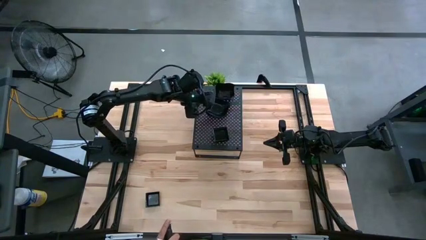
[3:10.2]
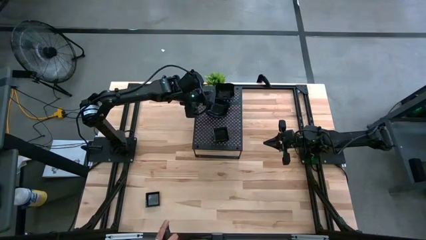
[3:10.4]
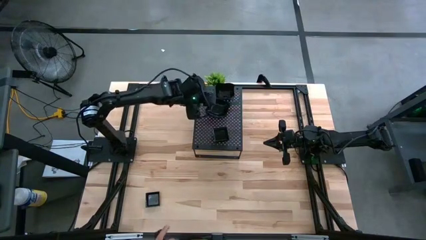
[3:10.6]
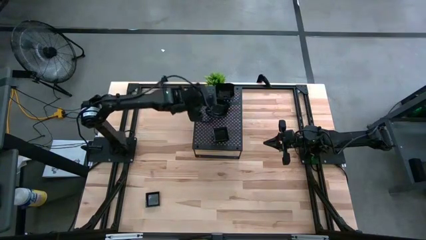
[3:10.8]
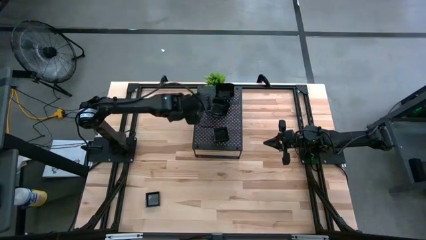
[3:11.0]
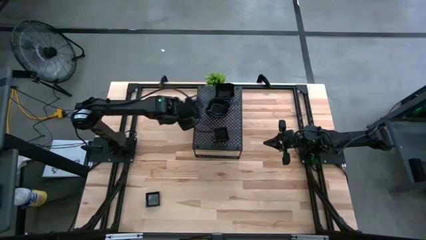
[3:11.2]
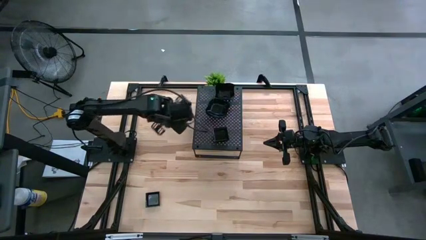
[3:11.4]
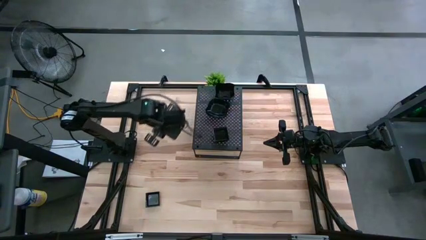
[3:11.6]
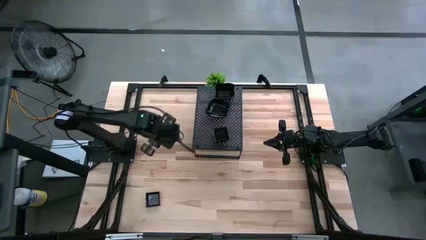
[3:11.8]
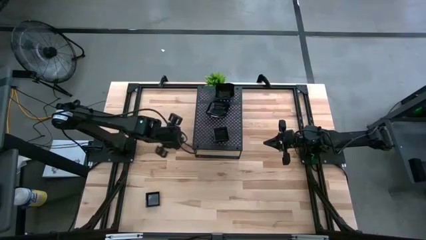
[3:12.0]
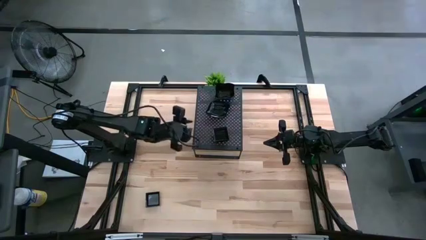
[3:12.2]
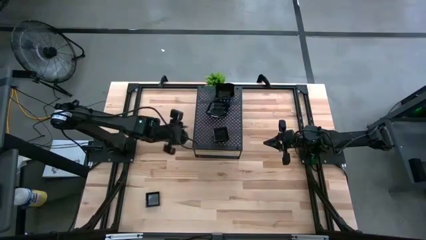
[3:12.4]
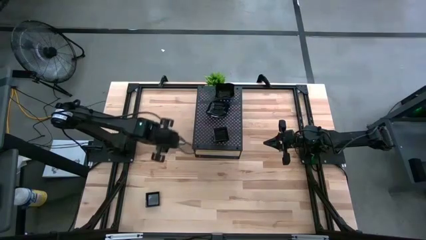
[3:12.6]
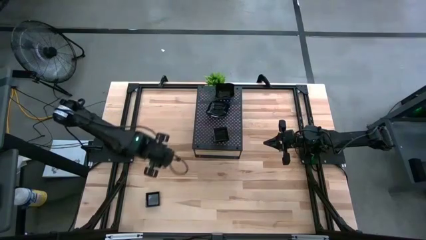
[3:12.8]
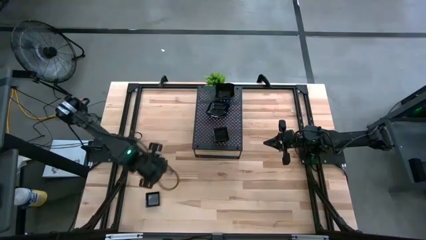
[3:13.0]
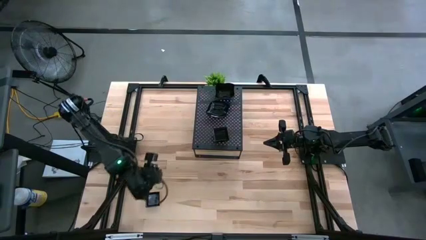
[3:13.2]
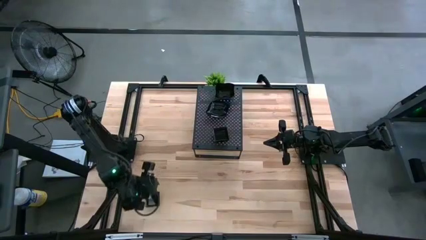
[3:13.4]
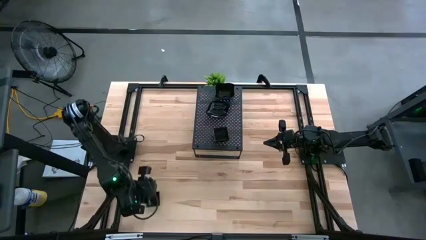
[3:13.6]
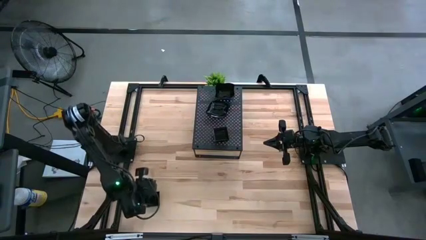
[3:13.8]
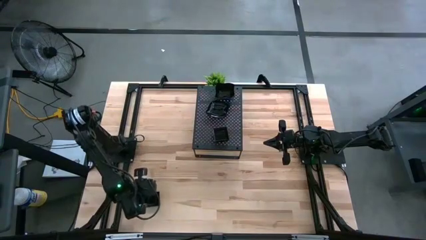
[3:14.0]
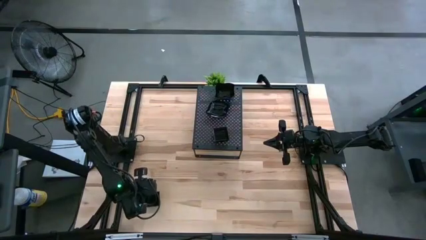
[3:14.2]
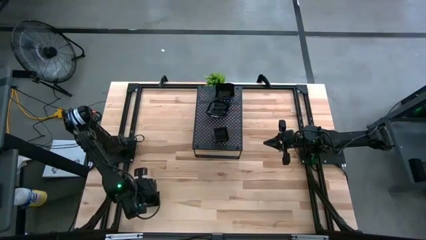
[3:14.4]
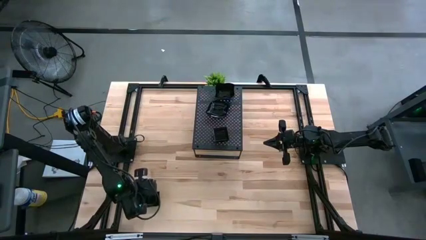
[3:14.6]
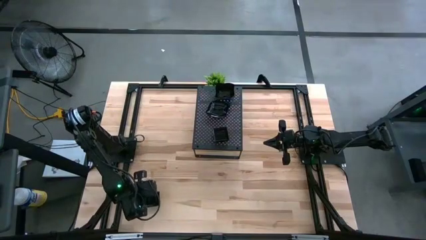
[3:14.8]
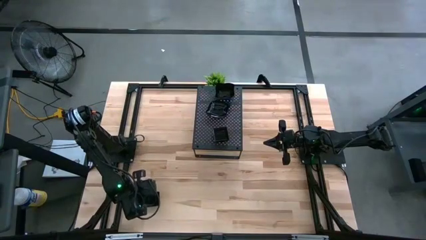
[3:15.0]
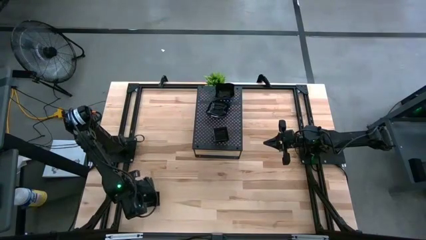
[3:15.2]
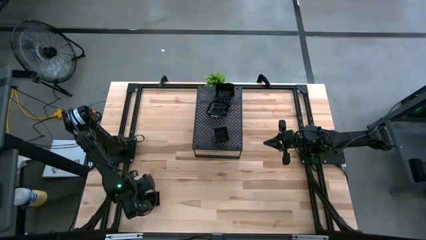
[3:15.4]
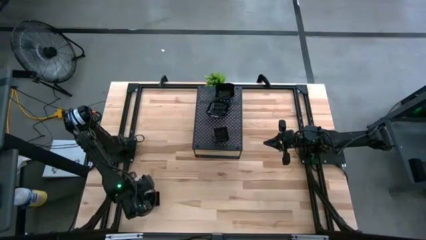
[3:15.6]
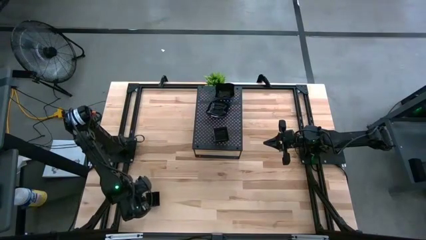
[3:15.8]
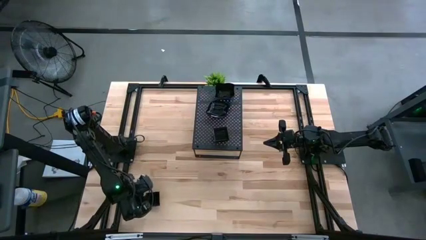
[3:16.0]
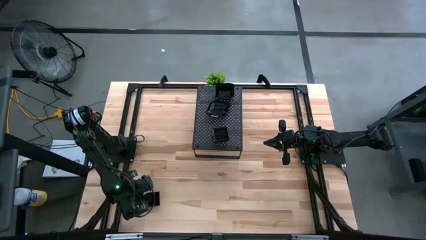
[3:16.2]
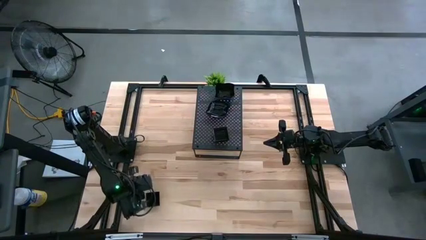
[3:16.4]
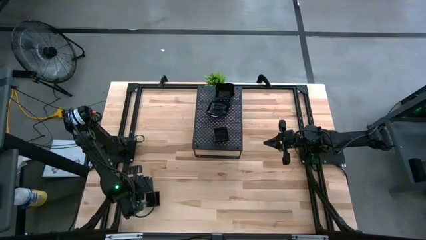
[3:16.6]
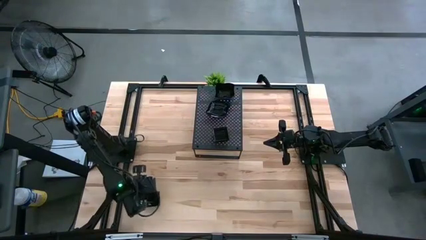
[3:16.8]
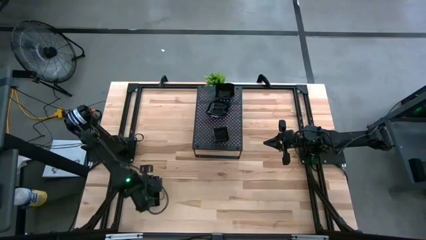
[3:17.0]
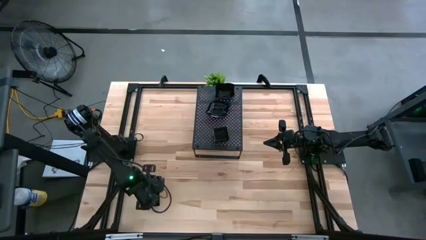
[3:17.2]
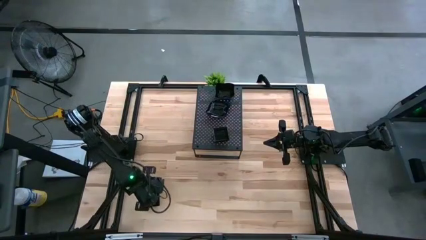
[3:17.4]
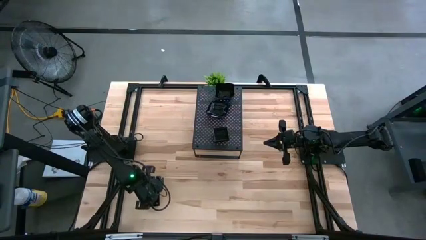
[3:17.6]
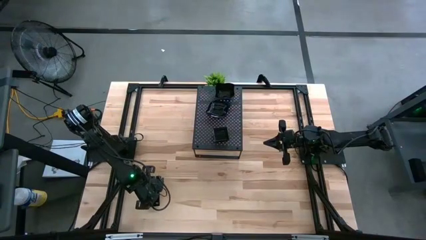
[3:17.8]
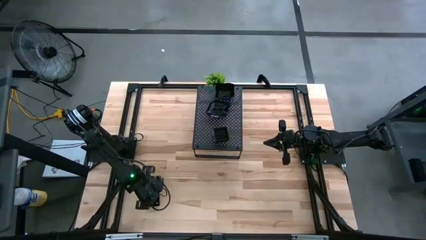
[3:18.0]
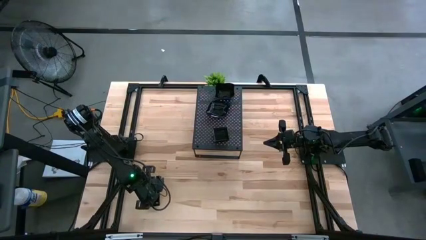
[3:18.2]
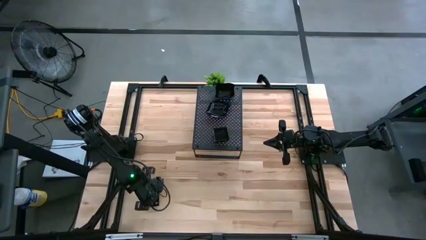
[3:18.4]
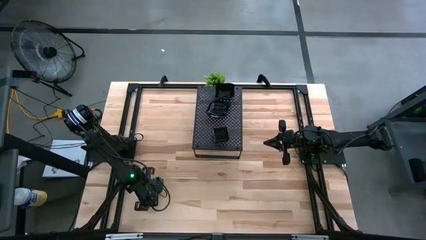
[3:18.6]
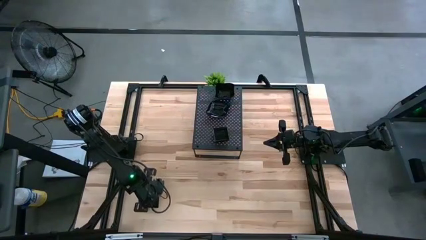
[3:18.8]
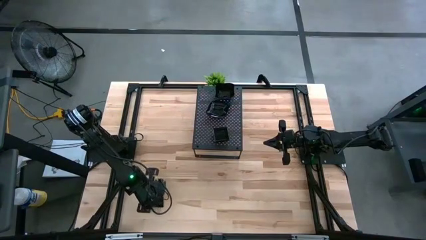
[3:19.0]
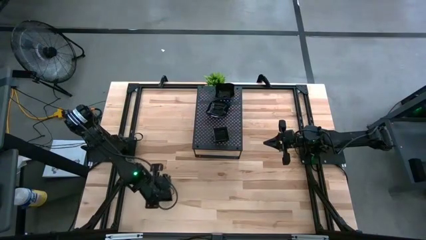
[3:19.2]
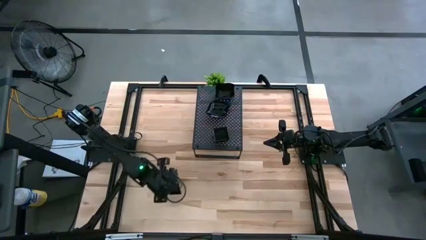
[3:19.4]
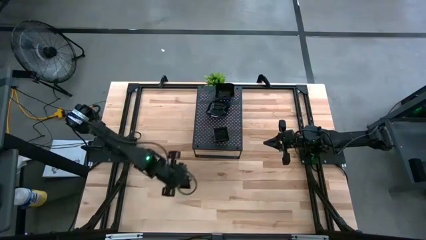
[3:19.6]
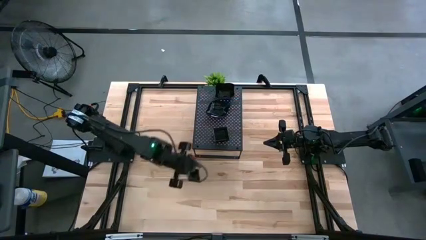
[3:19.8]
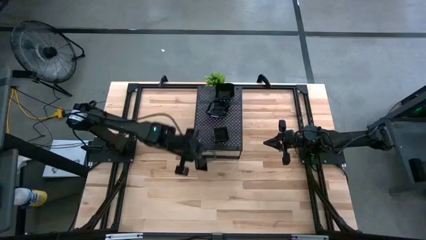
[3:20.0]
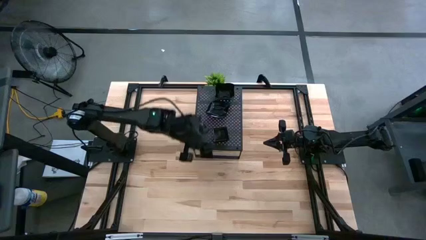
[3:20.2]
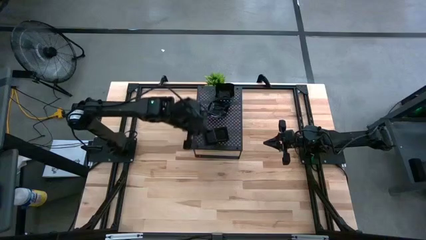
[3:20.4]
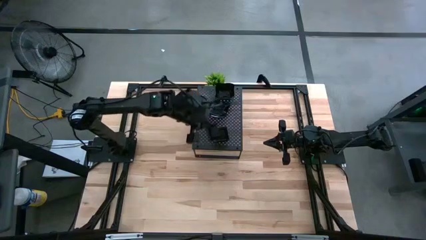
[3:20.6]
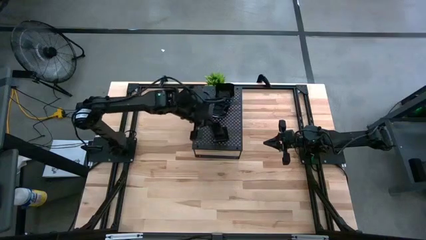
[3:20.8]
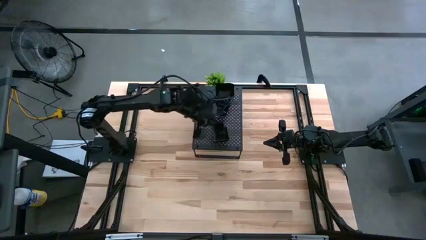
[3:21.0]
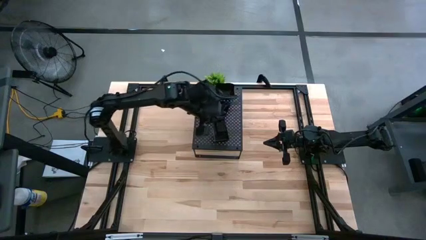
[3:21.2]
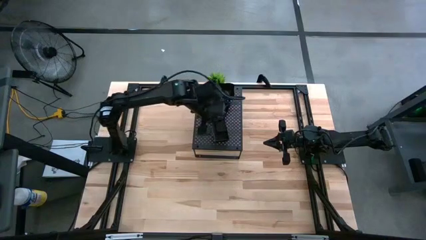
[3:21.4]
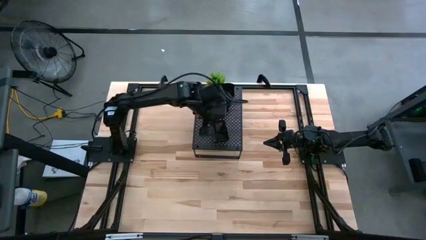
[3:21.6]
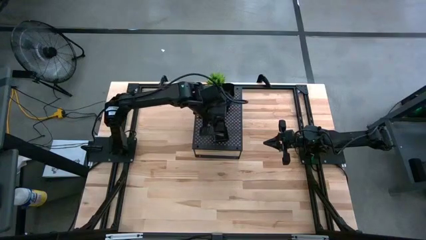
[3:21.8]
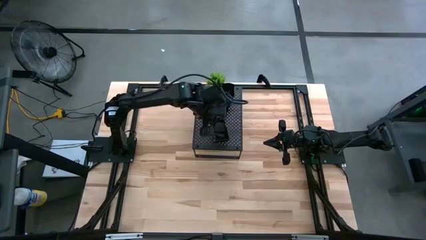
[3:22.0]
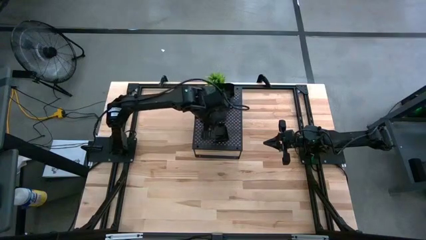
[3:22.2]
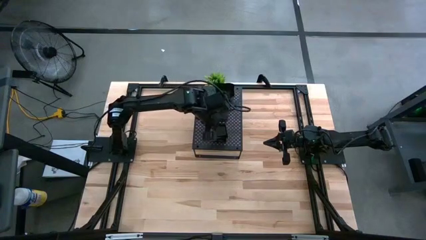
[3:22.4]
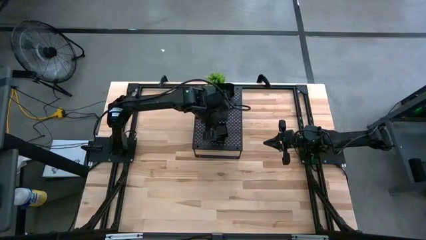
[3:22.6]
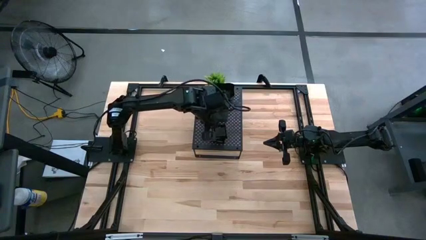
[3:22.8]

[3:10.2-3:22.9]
Task: Pick & Place Mini shaped plates
Stack the square plate on top of the square plate on the shelf

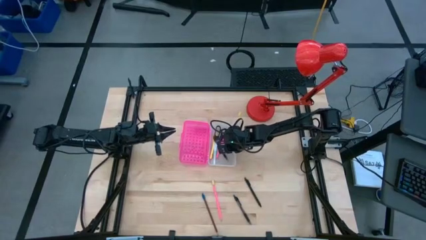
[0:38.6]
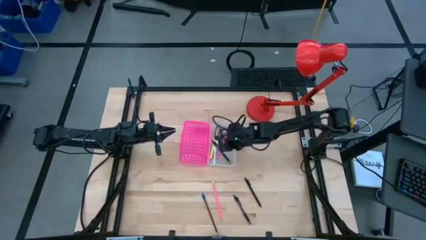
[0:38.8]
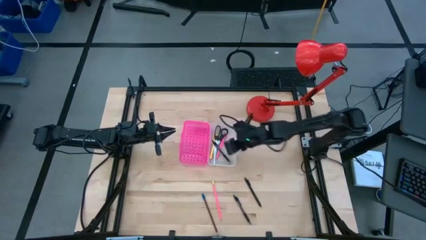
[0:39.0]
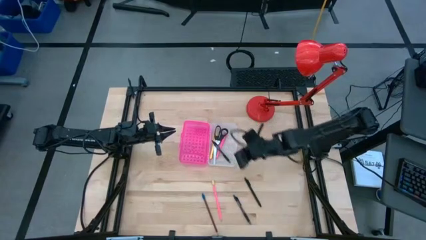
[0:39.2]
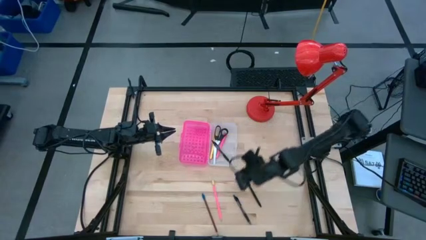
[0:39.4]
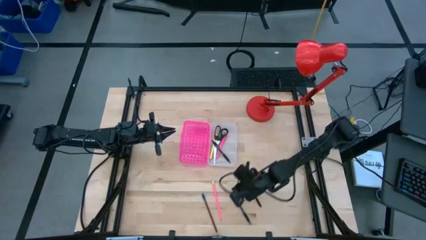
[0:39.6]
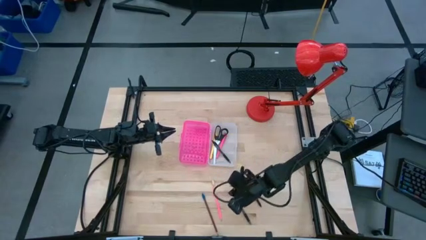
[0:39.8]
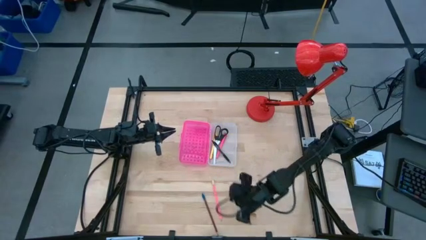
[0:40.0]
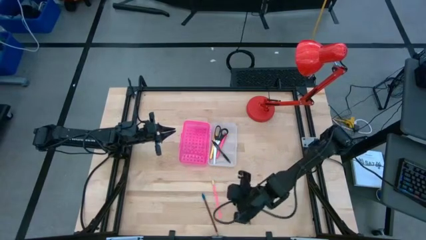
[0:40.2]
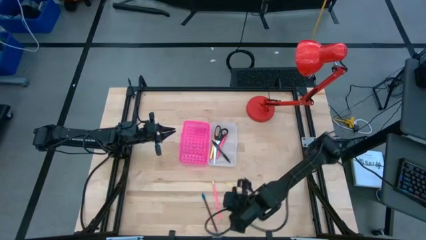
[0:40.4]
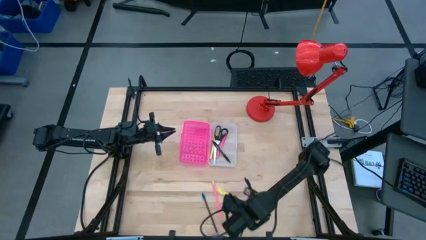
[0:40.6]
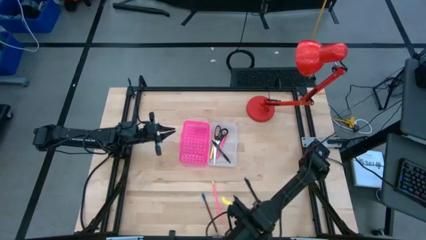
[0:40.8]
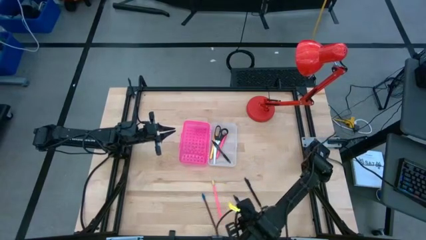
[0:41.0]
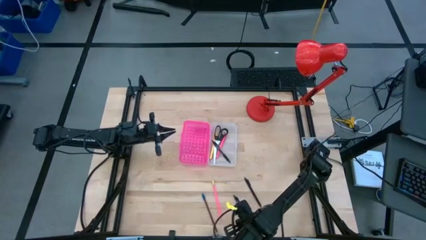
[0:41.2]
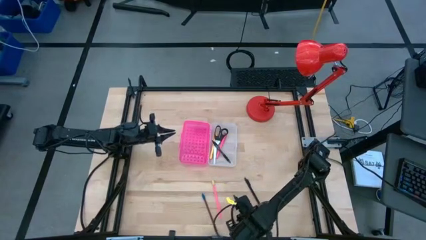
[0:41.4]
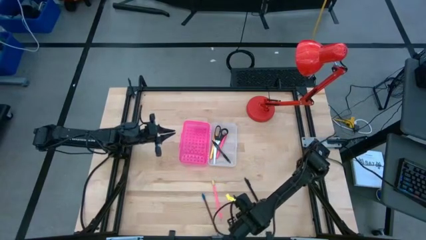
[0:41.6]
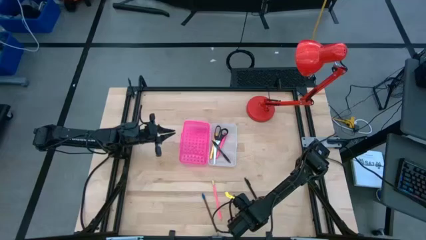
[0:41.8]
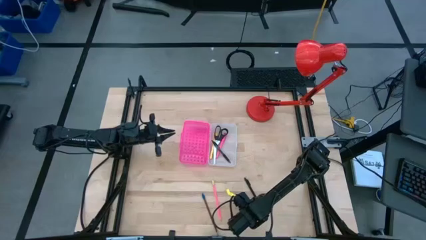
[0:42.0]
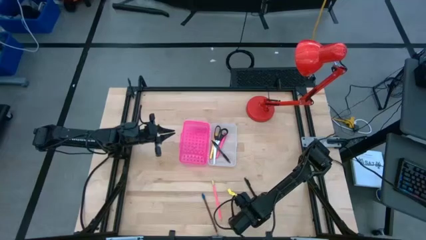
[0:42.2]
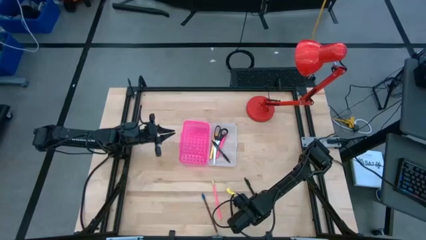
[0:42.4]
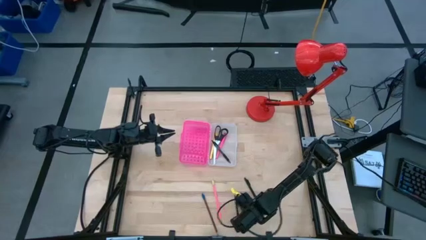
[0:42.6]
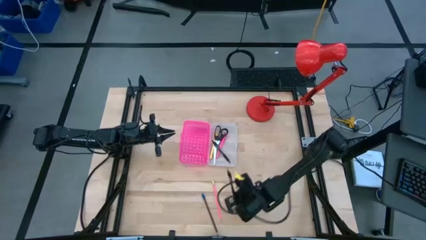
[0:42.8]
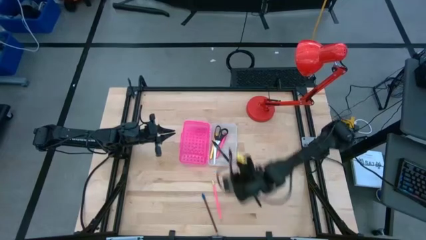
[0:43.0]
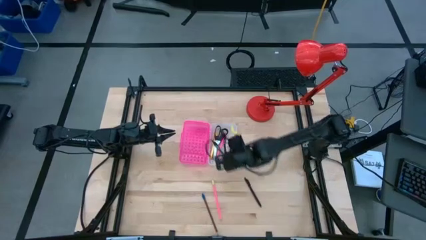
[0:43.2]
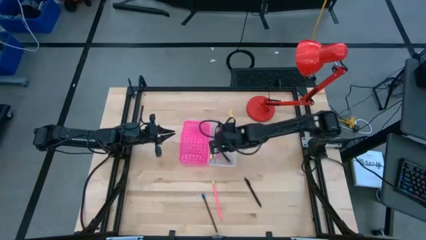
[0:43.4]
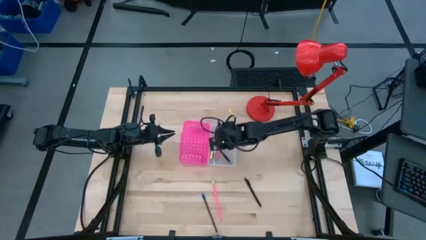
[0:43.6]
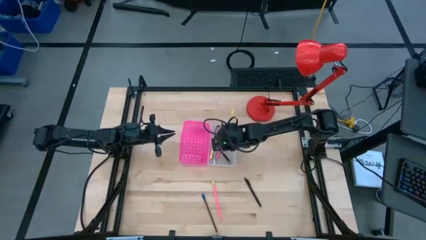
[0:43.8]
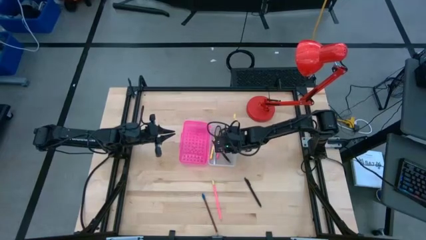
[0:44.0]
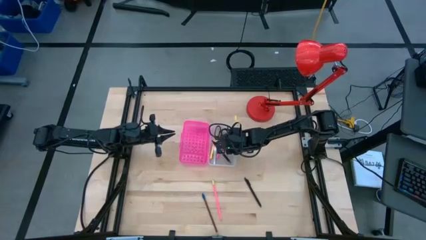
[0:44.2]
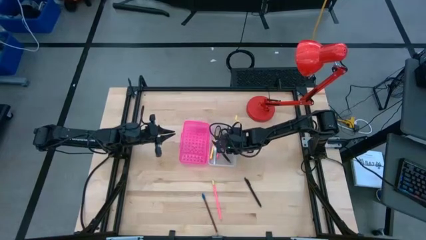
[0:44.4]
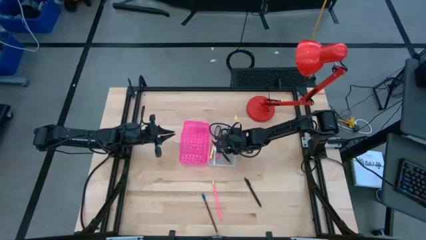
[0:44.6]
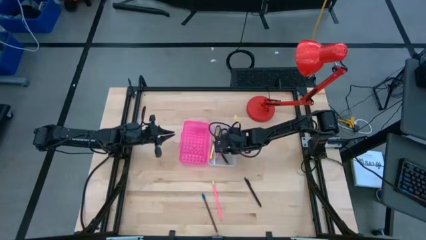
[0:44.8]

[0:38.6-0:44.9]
Task: Pick & place school supplies into a supply box
Put the black transparent pen into the supply box
